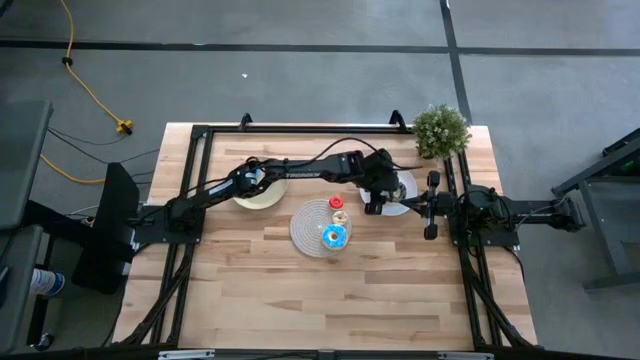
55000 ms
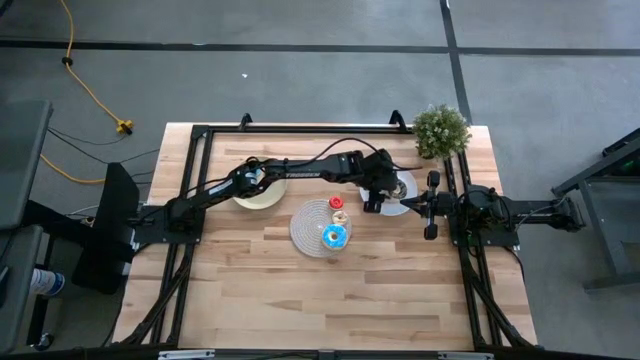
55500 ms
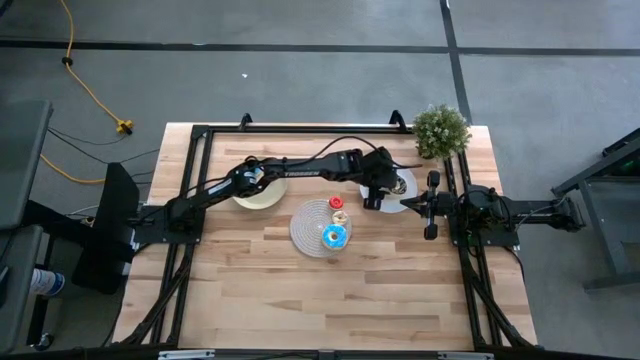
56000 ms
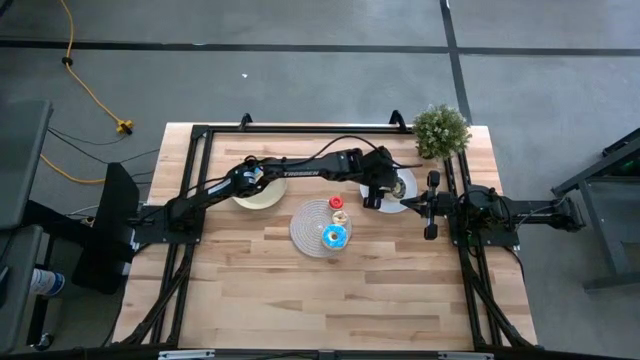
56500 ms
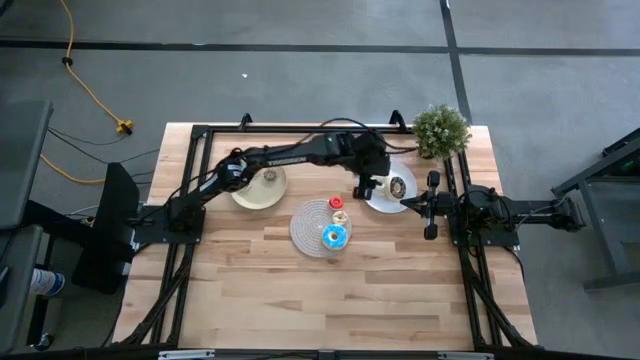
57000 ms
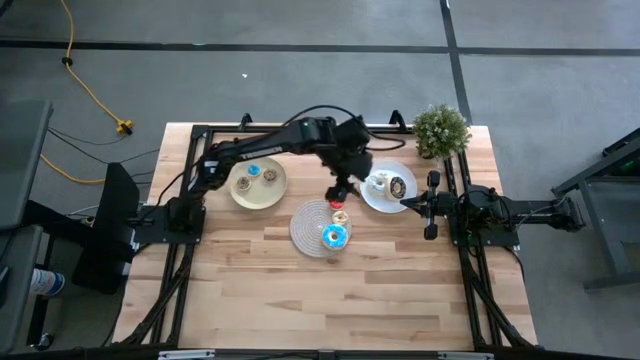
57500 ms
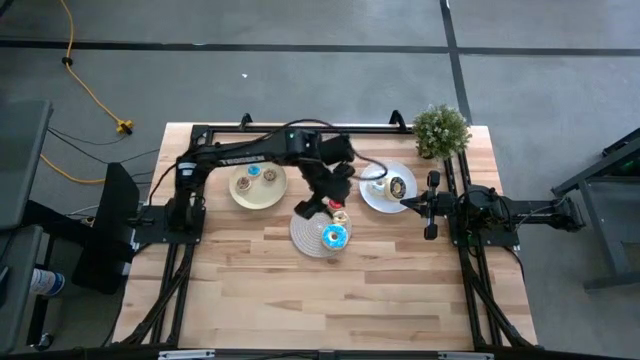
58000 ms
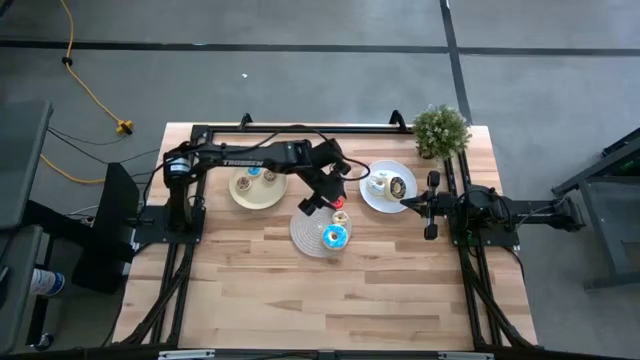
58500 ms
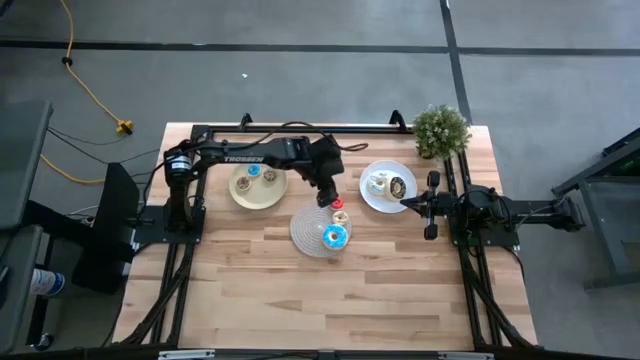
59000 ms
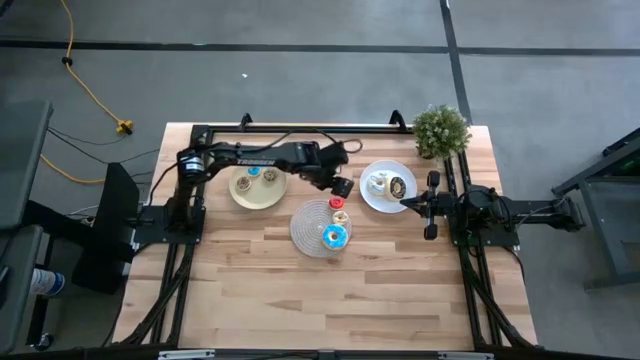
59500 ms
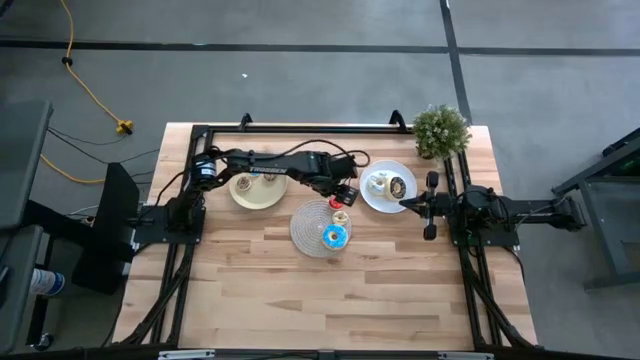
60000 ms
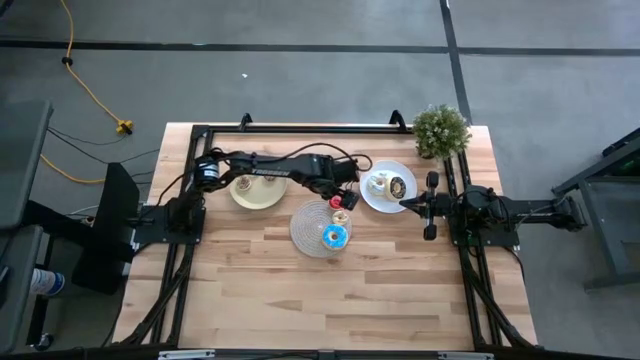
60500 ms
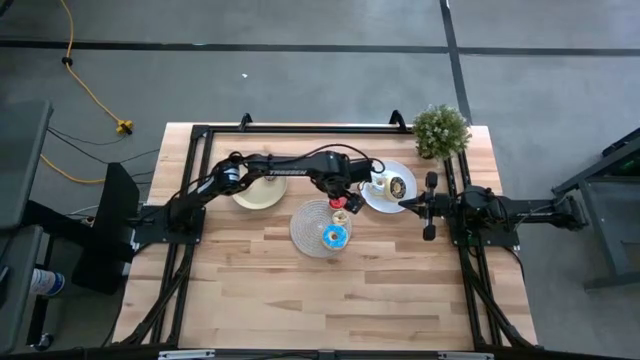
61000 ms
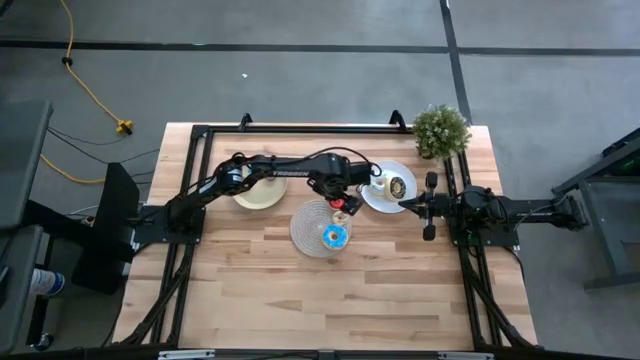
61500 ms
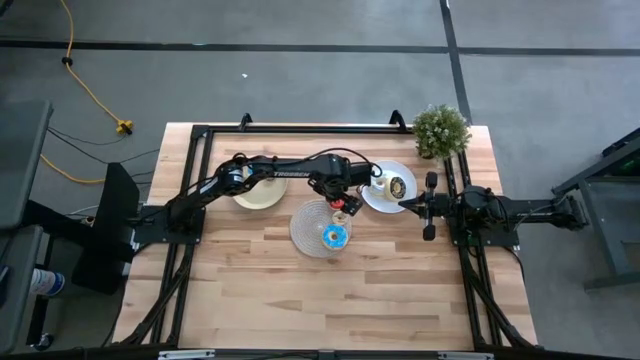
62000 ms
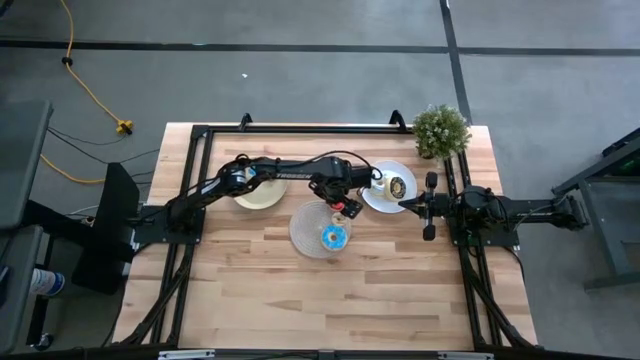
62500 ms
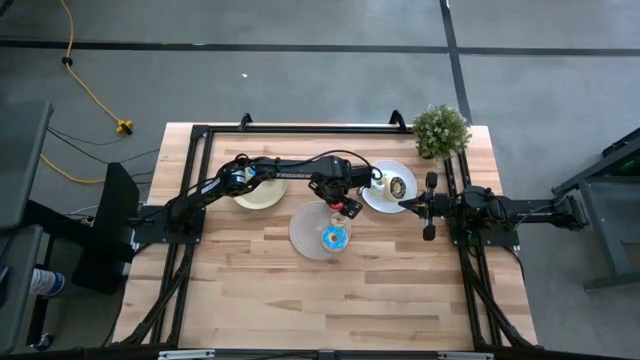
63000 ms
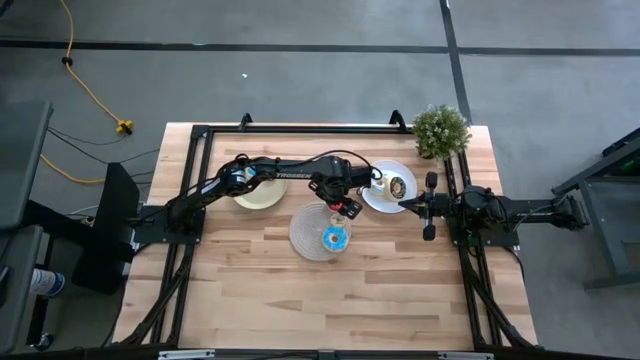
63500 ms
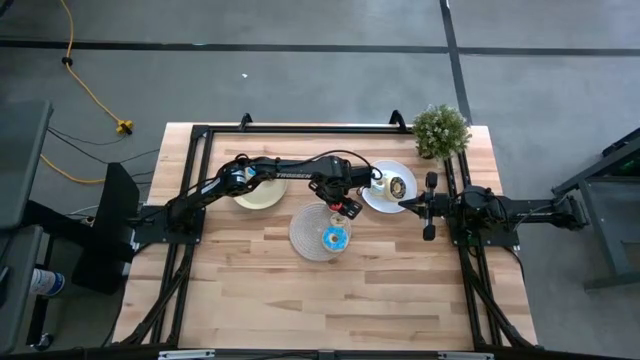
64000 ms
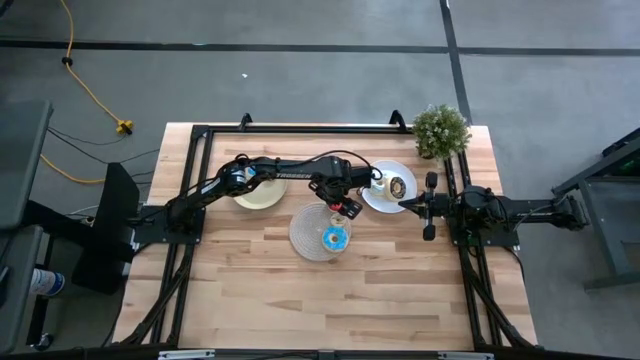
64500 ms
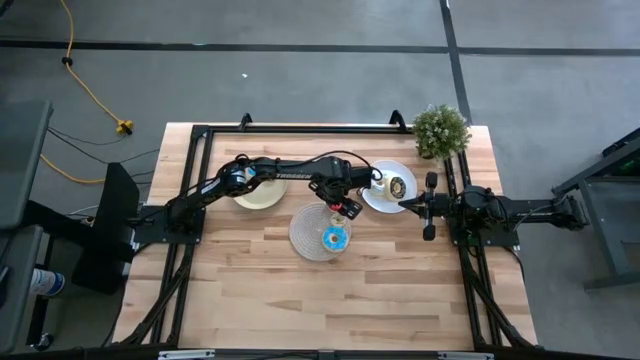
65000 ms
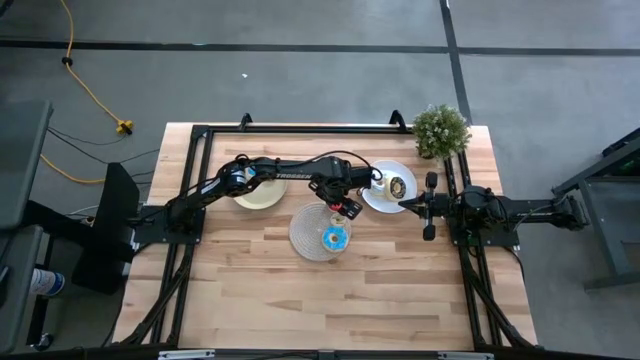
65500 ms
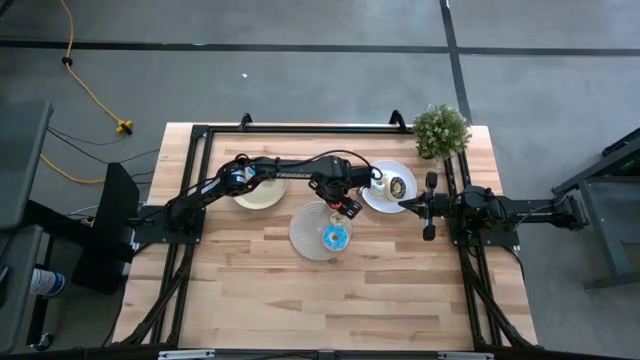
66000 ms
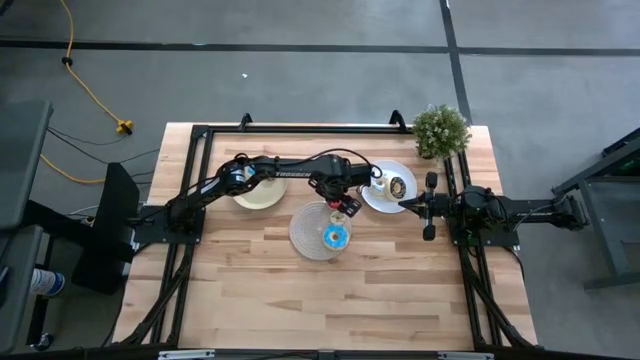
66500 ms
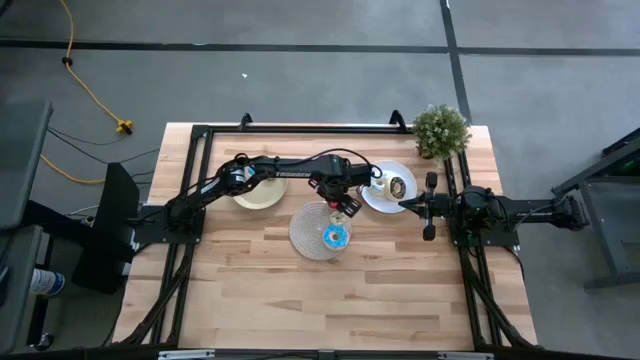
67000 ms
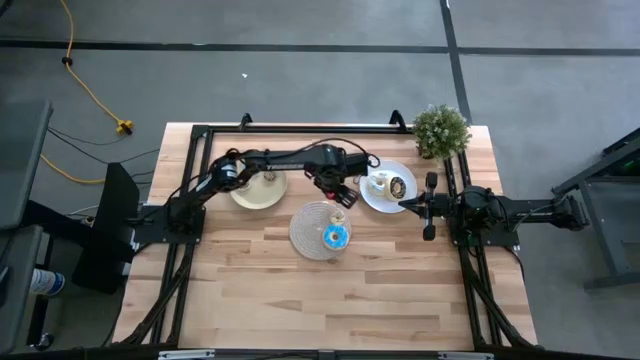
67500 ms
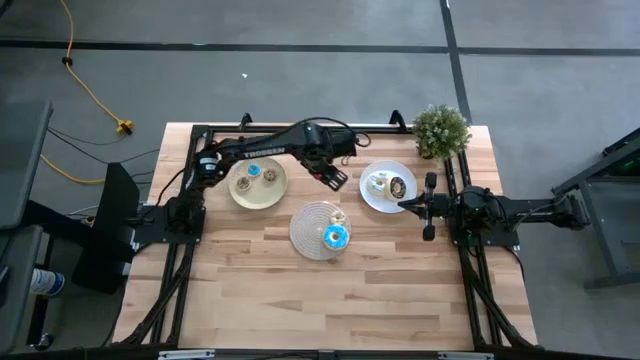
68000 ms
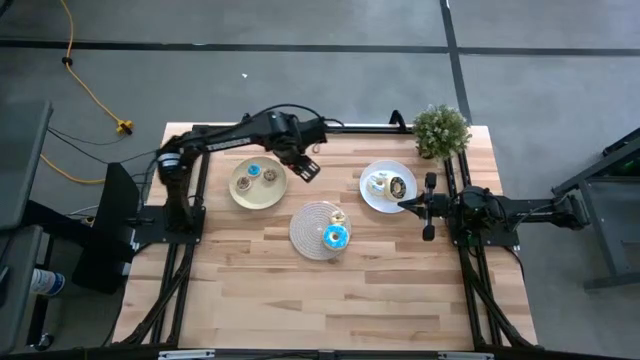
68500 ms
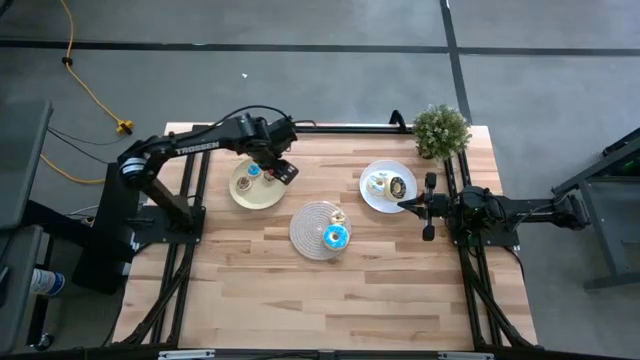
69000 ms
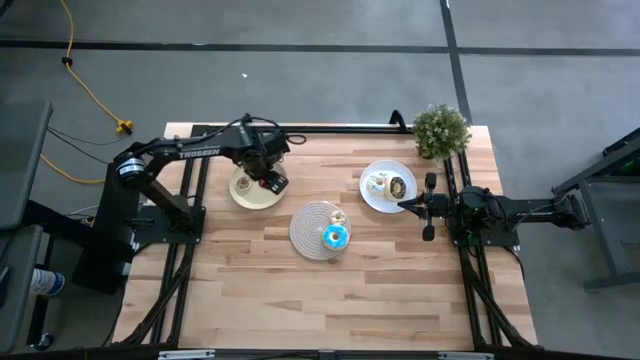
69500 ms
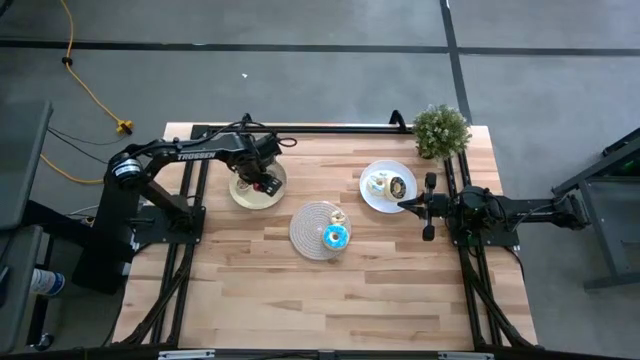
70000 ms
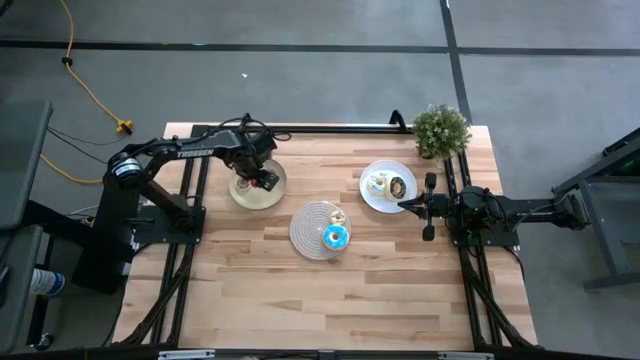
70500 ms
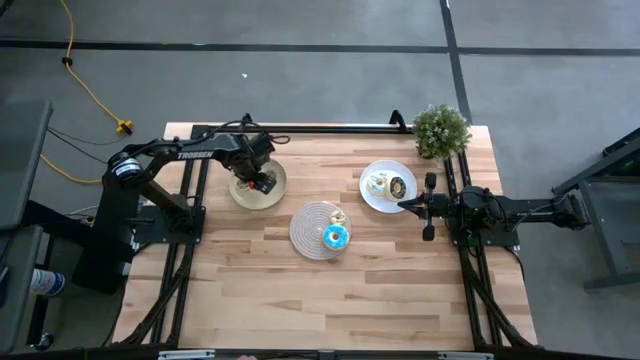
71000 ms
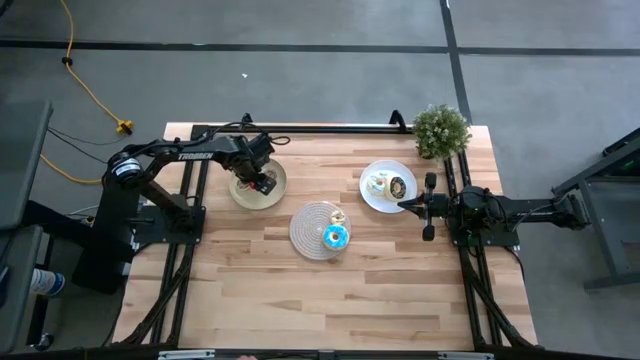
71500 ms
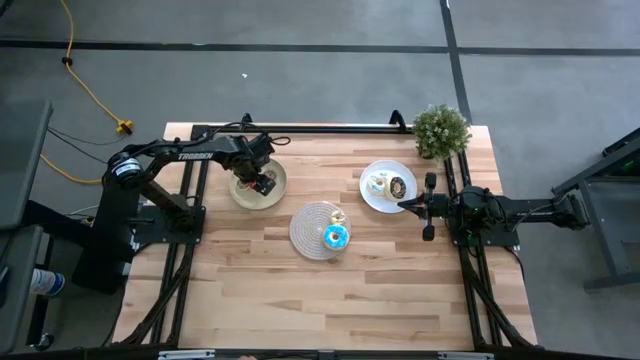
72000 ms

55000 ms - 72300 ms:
Task: Pick & Place donuts
Put the small red donut on the brown plate

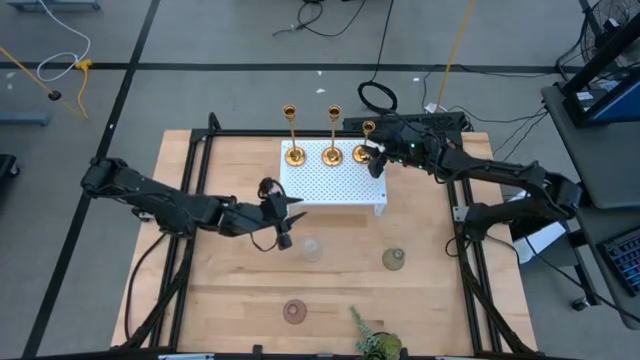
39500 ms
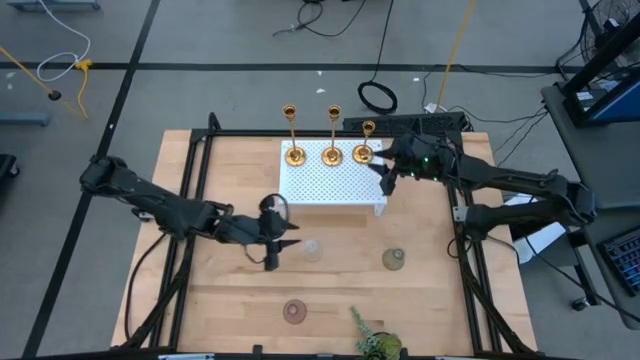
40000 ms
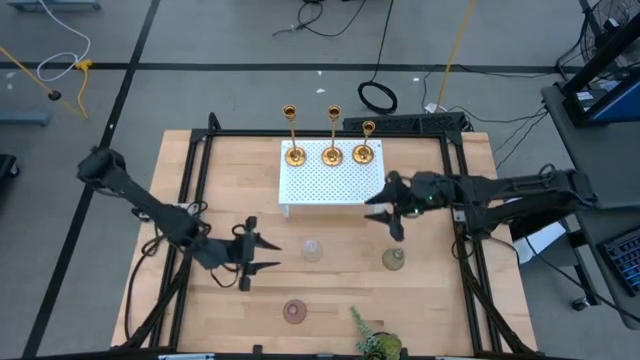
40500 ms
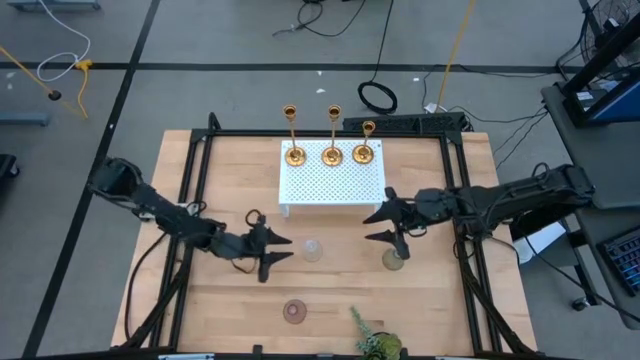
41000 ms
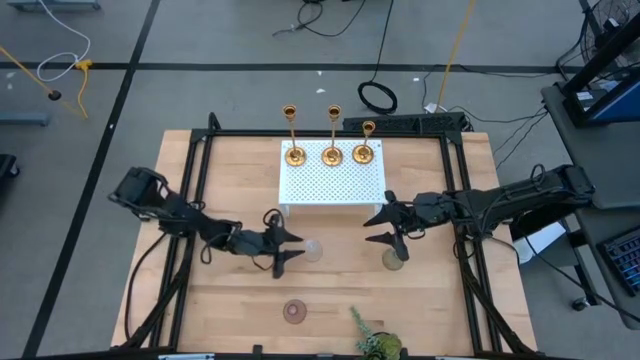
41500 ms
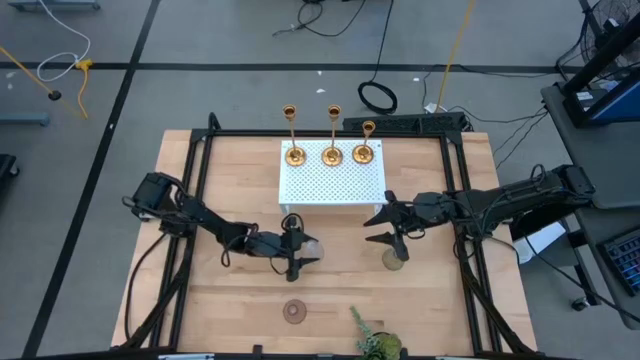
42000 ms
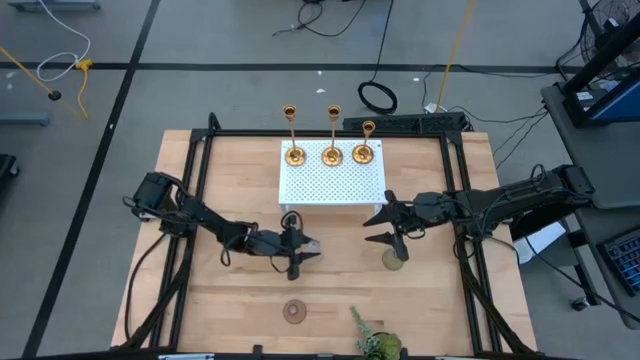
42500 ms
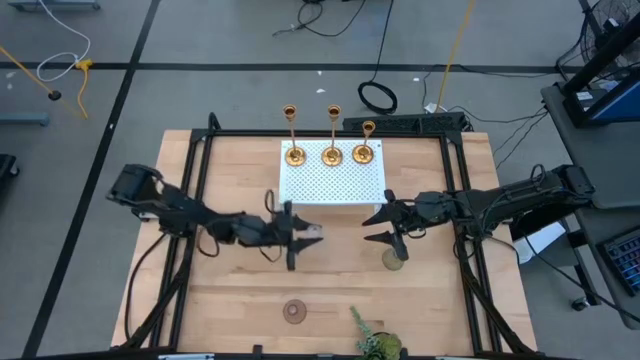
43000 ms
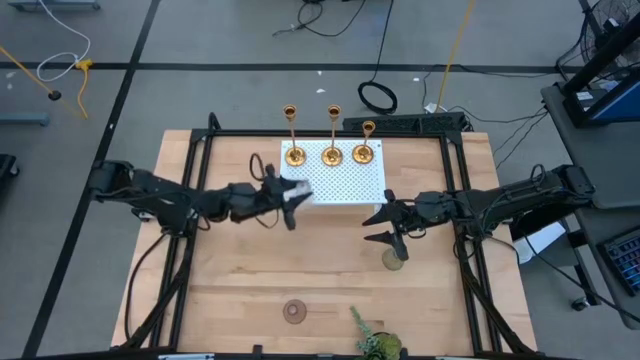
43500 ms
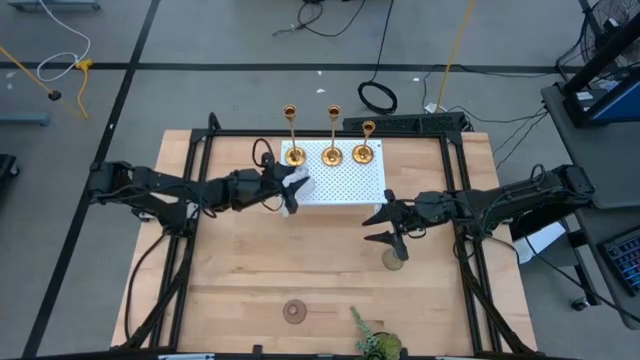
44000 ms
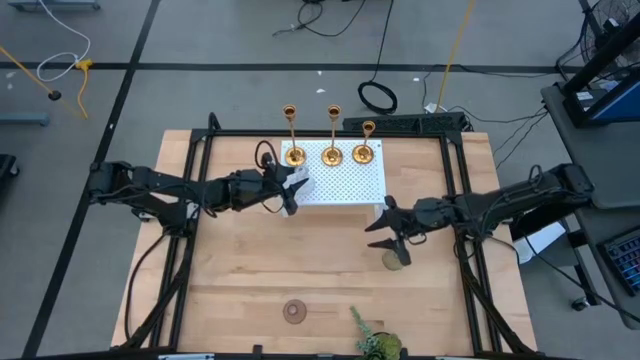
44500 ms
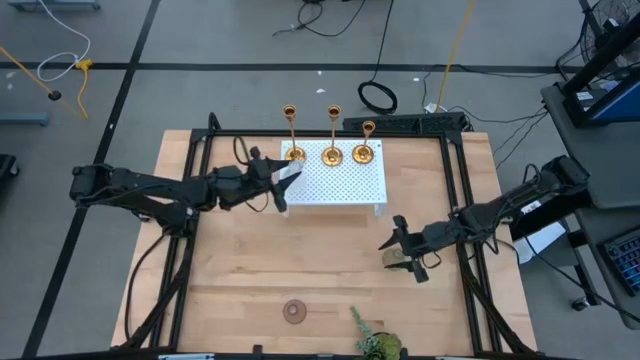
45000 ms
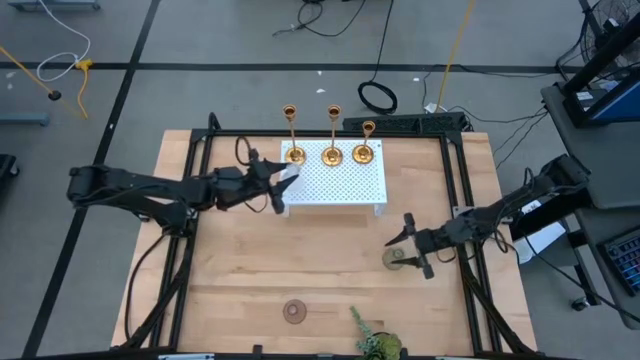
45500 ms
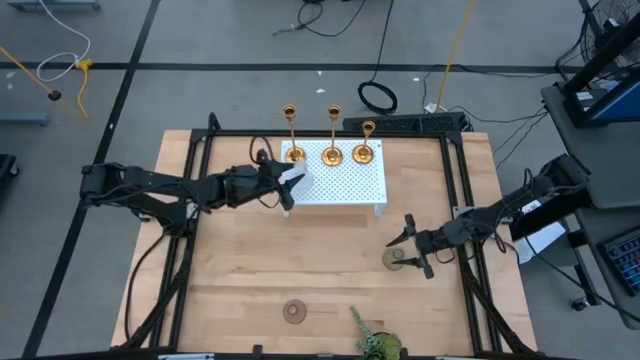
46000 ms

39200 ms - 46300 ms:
Task: Pick & Place candle stick holders
Put the transparent glass candle holder on the shelf
